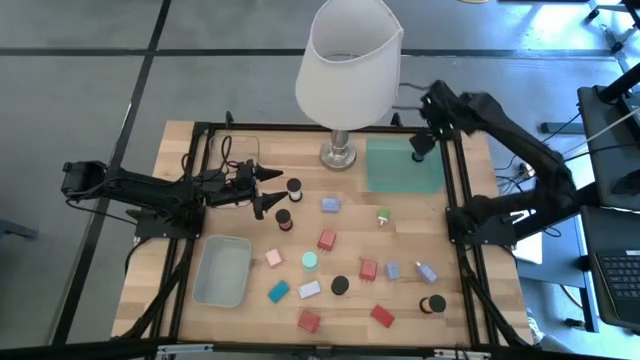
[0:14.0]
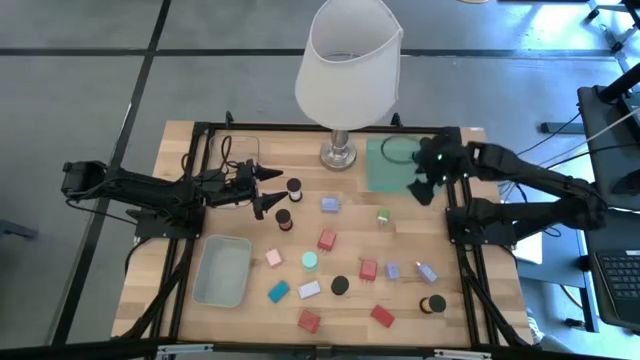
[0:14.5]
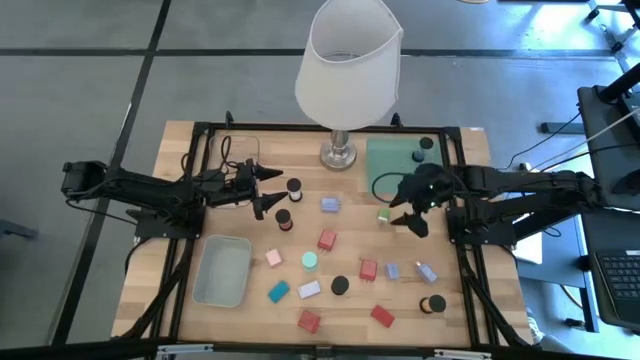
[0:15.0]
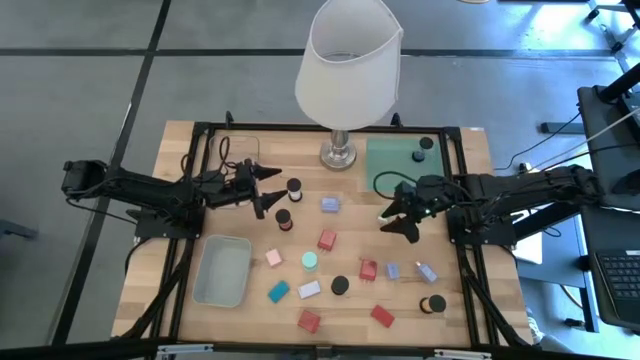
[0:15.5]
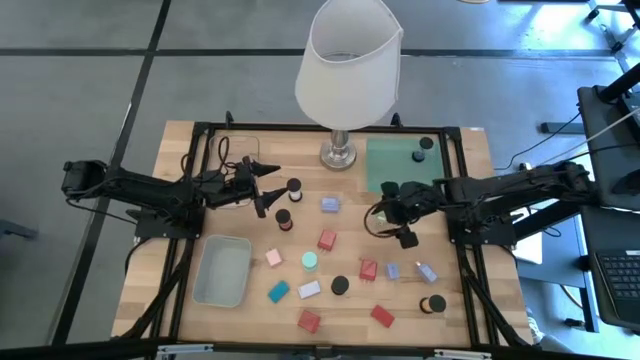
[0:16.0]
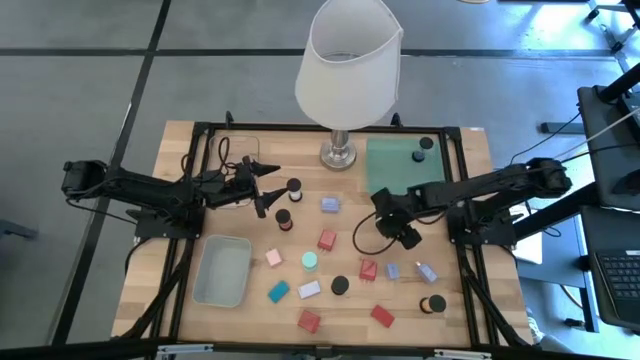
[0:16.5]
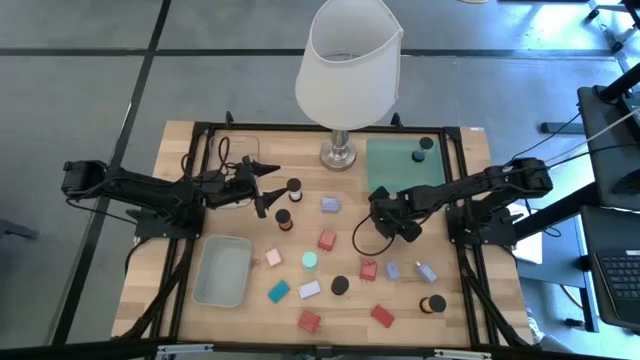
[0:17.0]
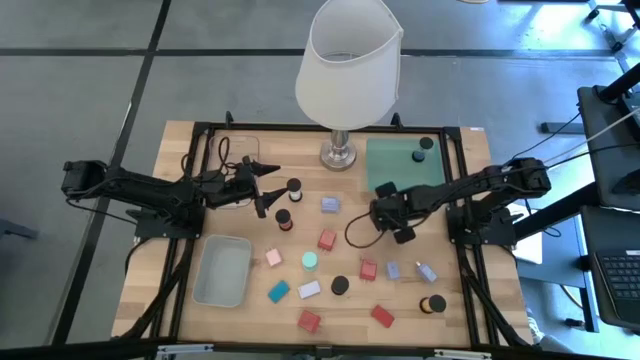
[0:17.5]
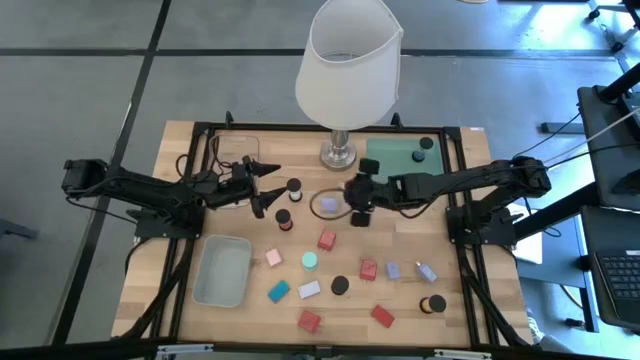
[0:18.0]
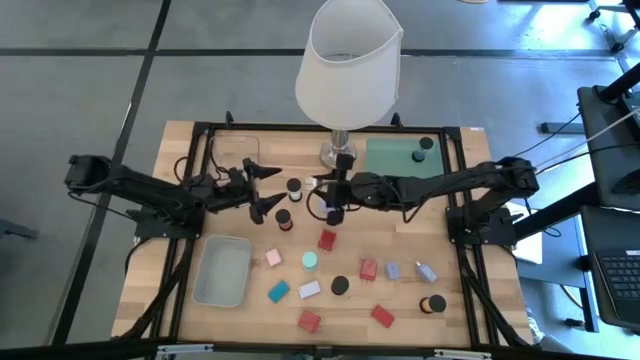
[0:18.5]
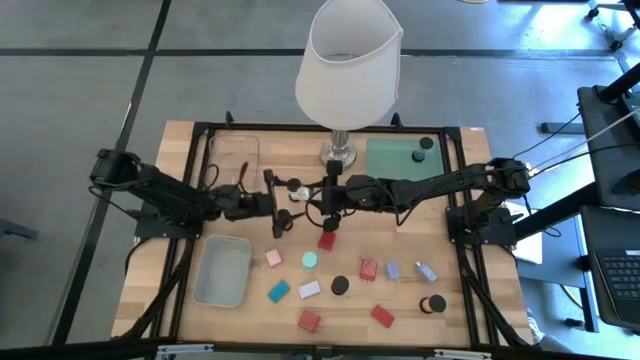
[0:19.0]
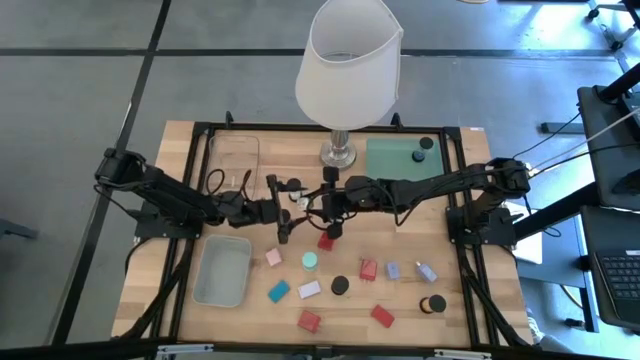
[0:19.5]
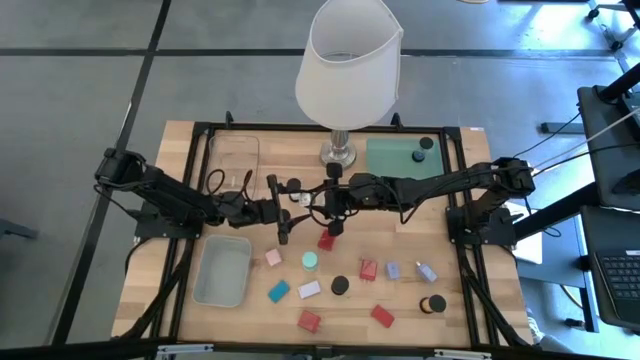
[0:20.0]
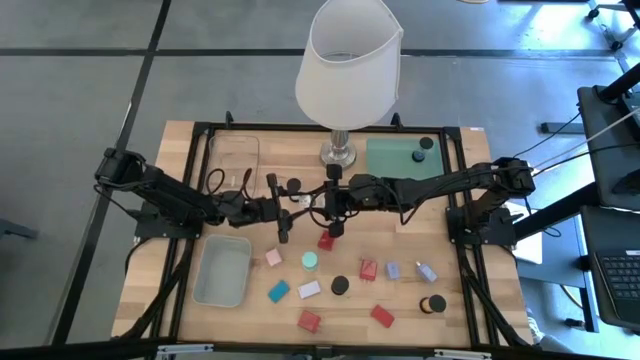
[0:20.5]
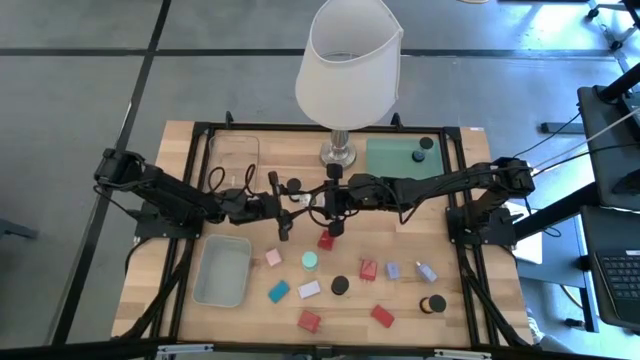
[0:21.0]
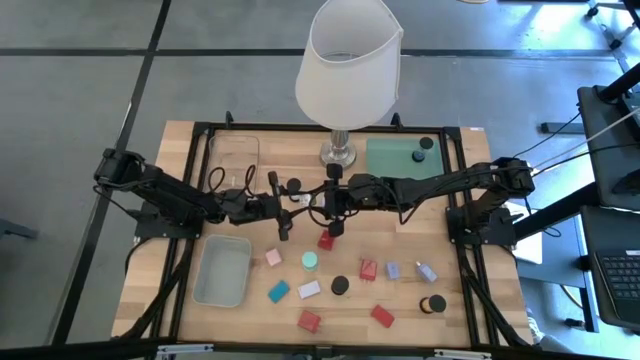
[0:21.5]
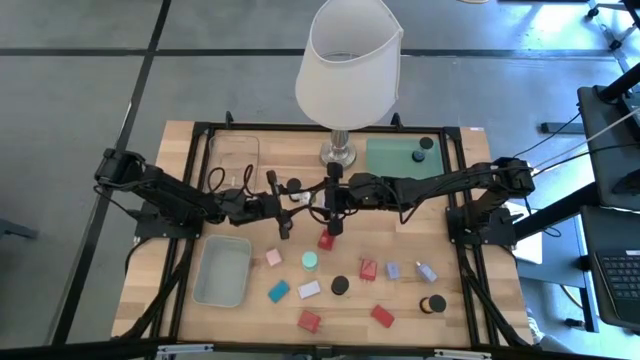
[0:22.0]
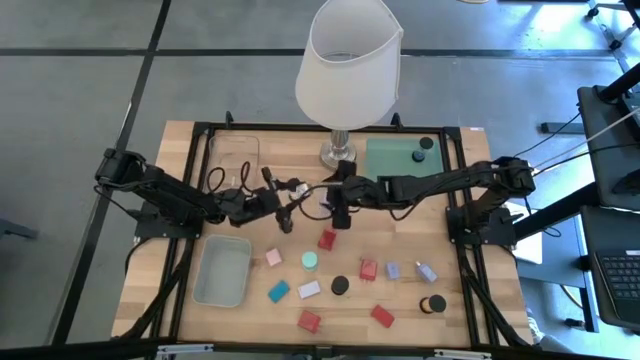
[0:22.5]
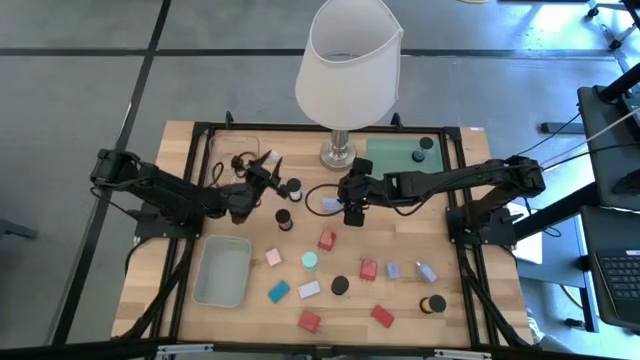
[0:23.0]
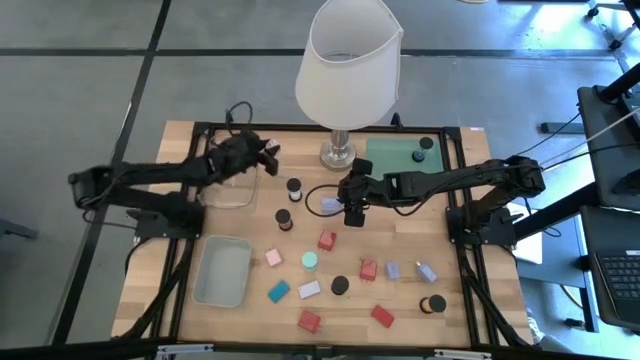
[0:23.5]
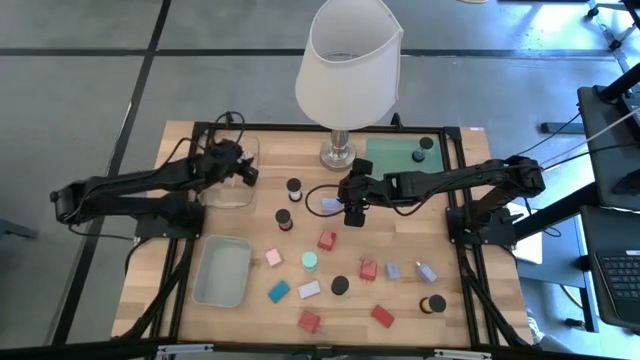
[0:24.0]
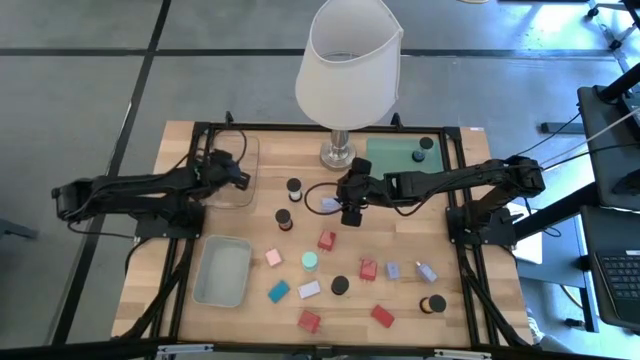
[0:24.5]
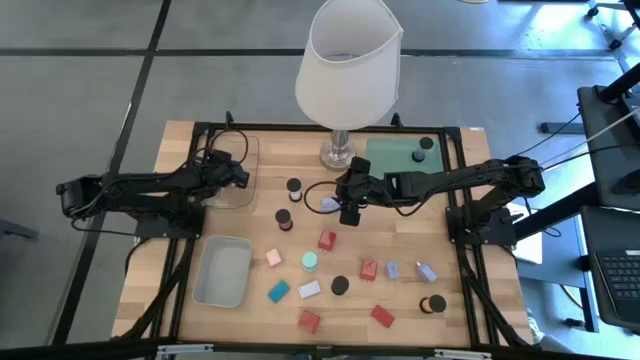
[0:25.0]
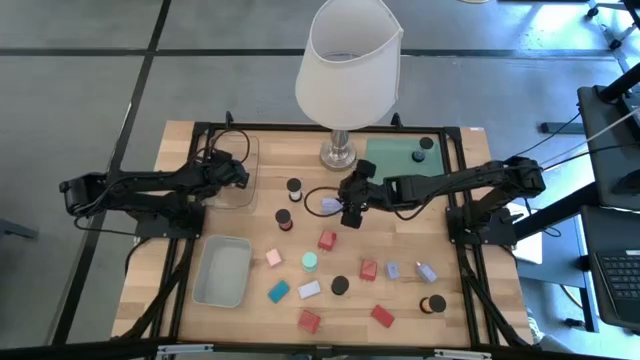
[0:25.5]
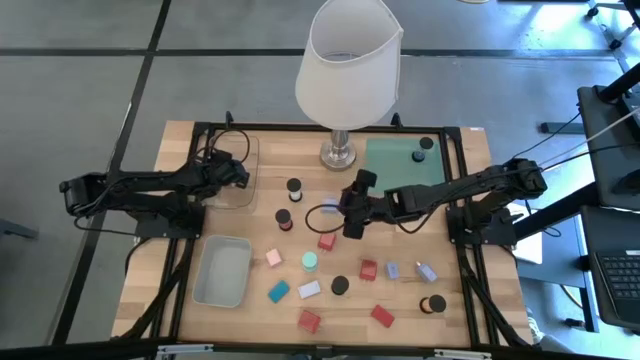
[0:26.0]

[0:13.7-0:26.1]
Task: Pick & Place Office items
Put the green charger adapter into the transparent bin

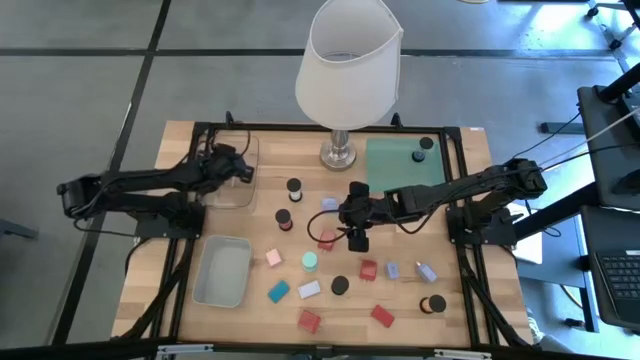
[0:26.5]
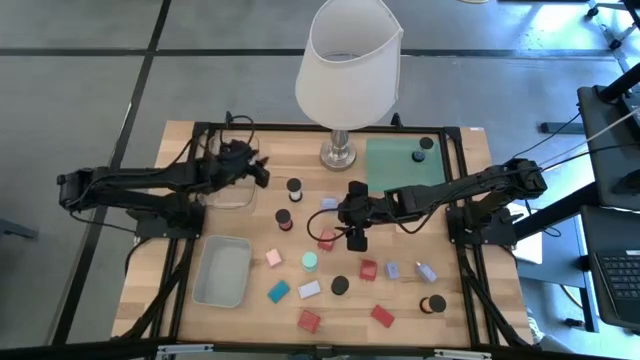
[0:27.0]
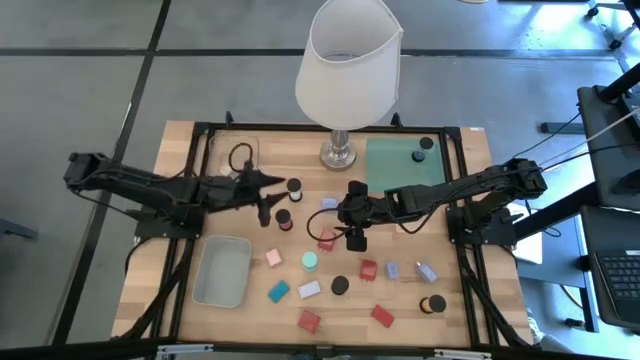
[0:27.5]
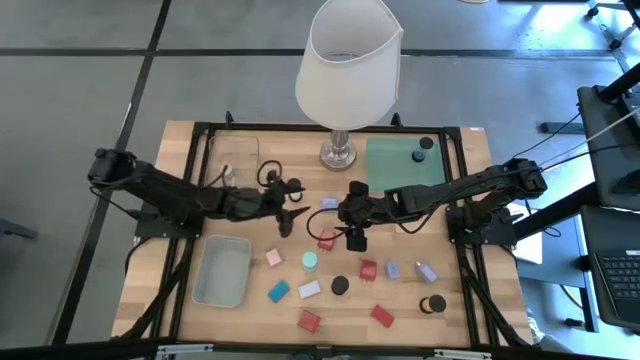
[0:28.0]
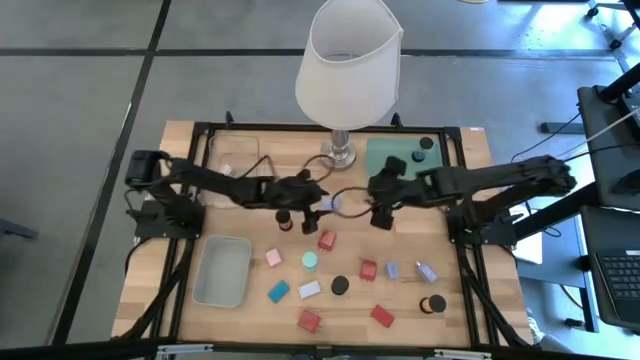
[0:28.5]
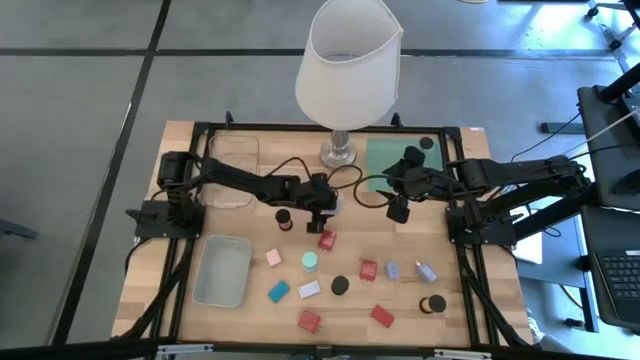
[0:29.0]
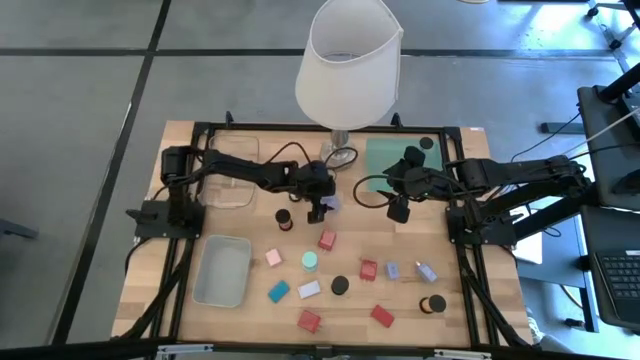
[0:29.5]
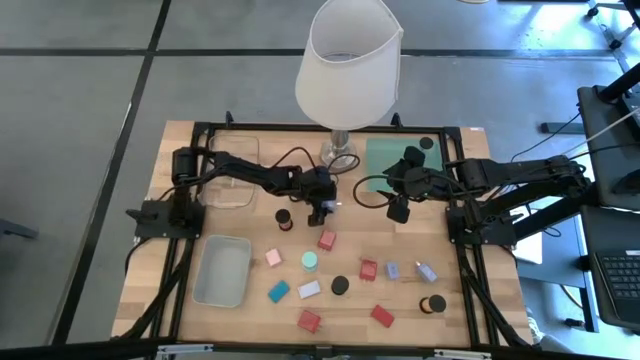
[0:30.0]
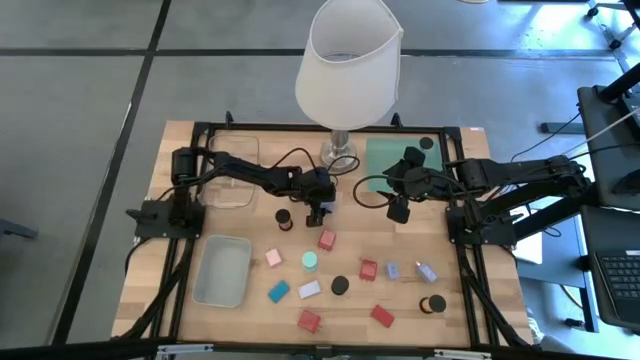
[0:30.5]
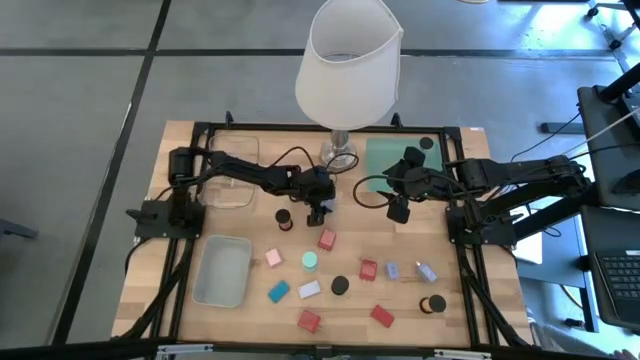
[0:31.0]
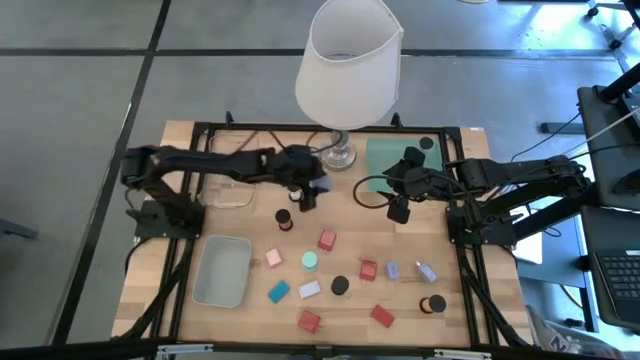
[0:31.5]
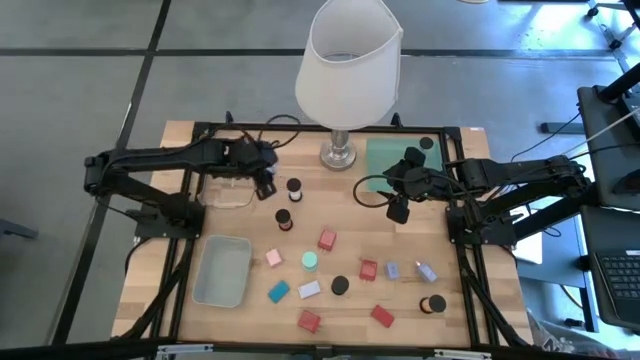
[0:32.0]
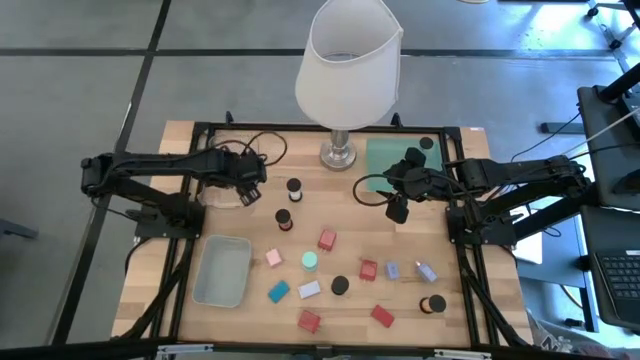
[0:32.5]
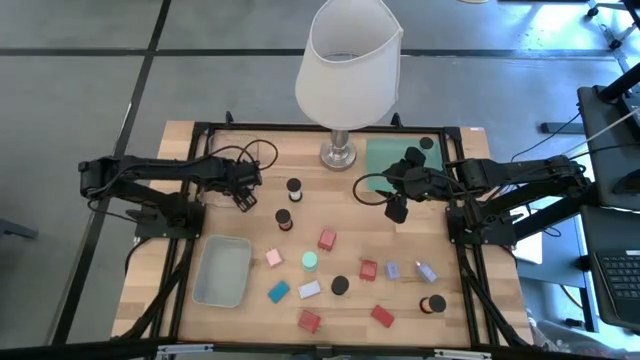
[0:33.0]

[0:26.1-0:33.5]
Put the light blue charger adapter into the transparent bin
